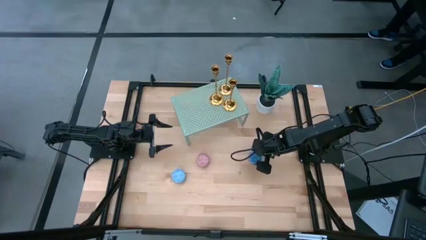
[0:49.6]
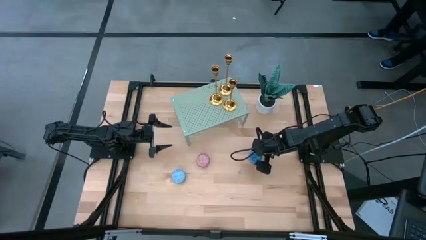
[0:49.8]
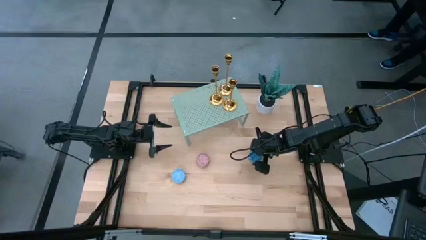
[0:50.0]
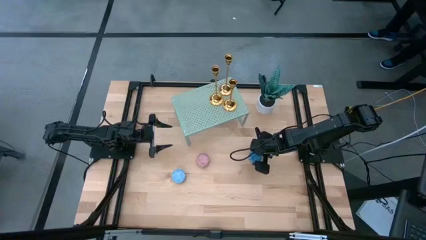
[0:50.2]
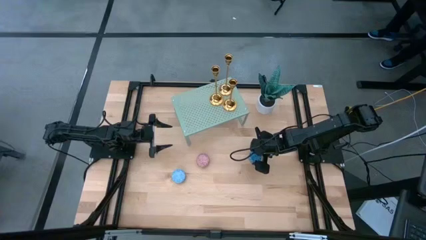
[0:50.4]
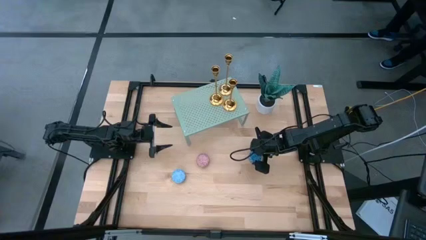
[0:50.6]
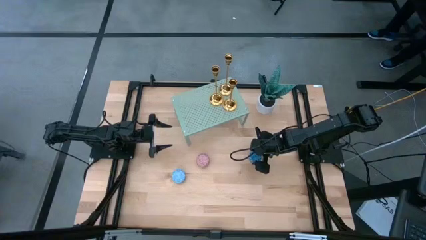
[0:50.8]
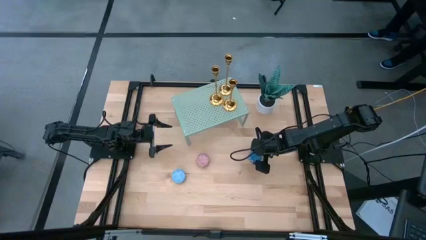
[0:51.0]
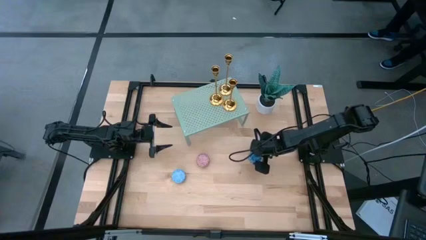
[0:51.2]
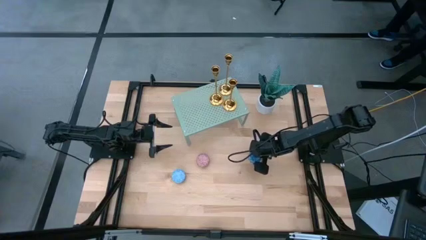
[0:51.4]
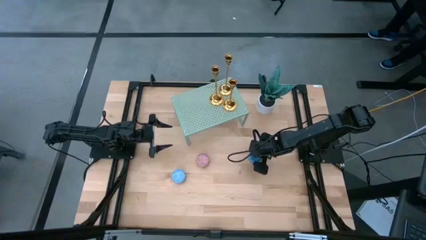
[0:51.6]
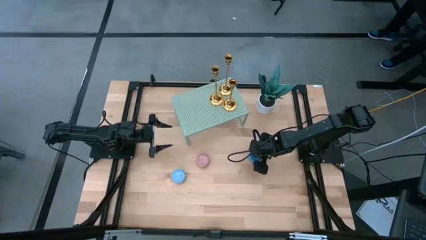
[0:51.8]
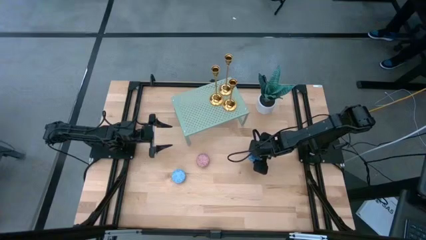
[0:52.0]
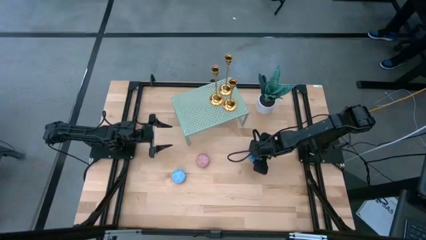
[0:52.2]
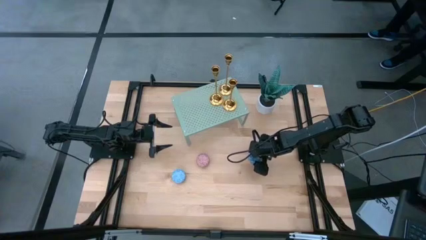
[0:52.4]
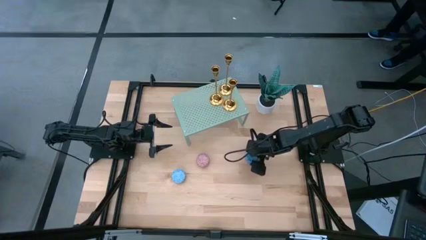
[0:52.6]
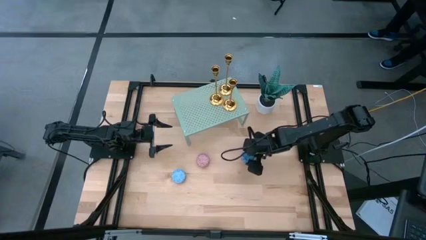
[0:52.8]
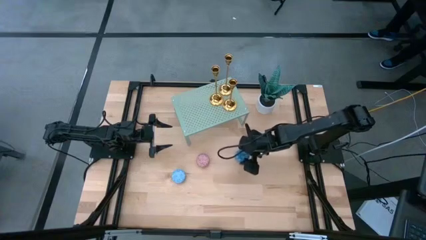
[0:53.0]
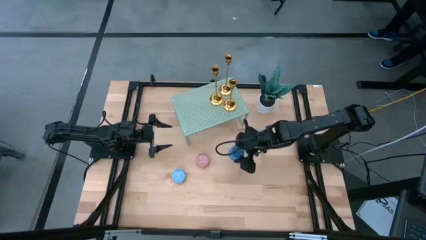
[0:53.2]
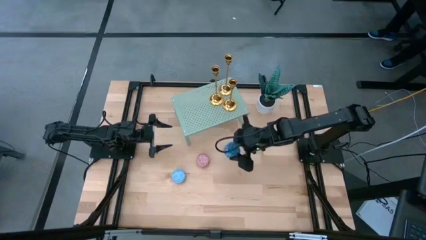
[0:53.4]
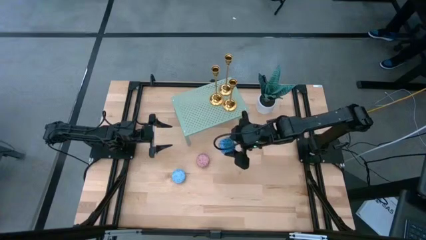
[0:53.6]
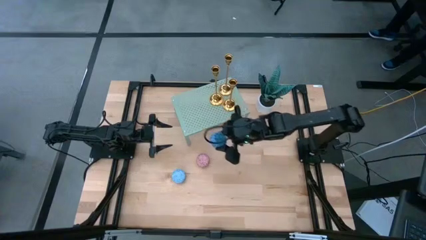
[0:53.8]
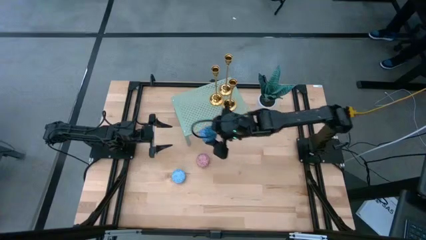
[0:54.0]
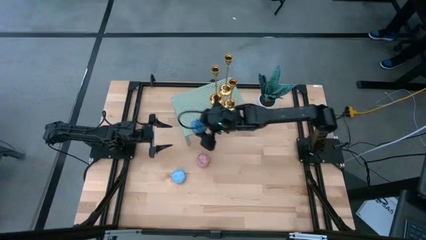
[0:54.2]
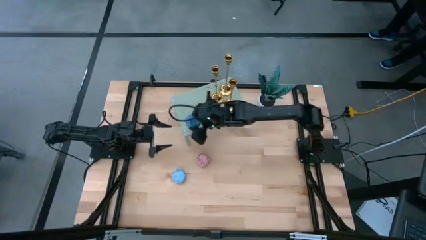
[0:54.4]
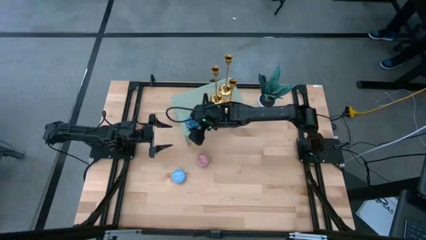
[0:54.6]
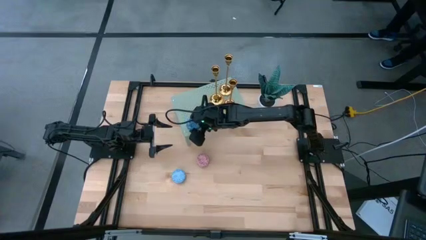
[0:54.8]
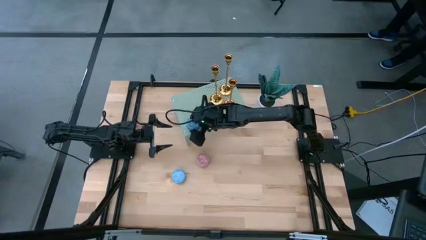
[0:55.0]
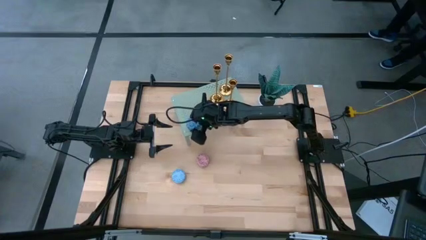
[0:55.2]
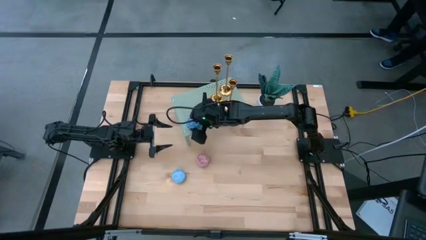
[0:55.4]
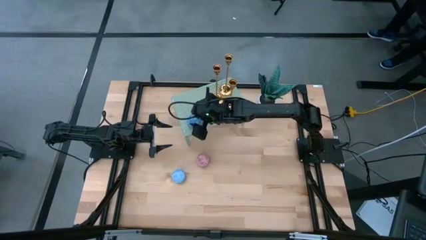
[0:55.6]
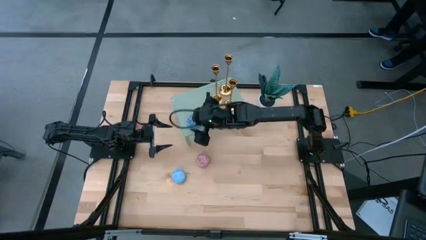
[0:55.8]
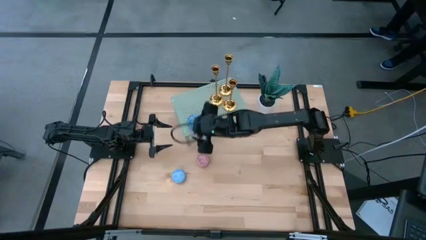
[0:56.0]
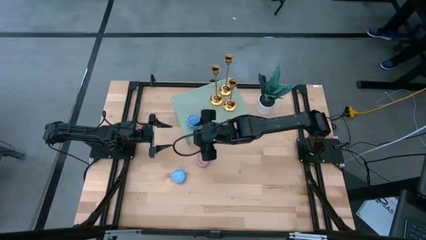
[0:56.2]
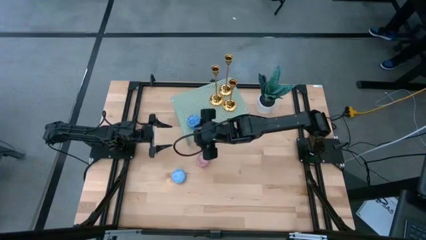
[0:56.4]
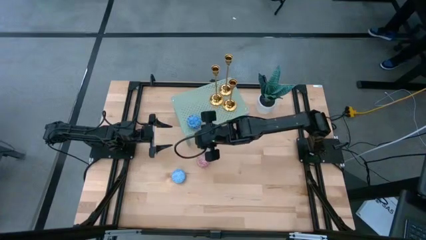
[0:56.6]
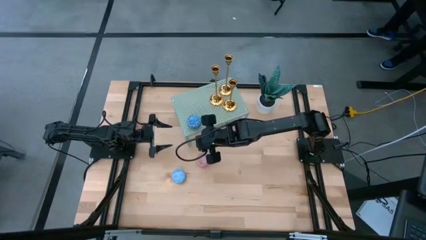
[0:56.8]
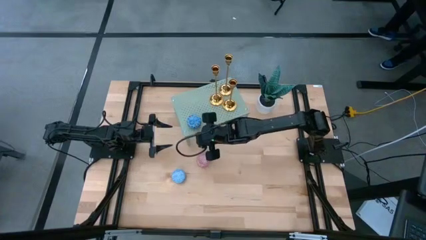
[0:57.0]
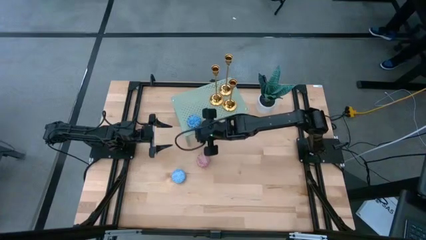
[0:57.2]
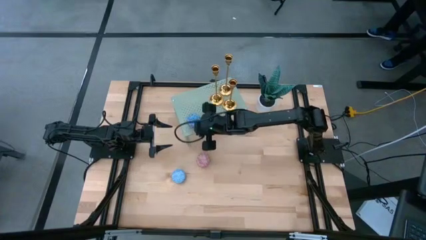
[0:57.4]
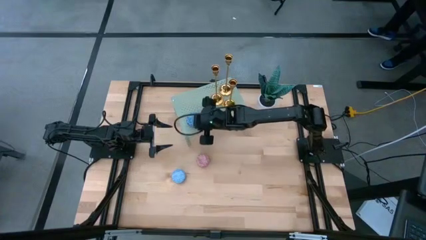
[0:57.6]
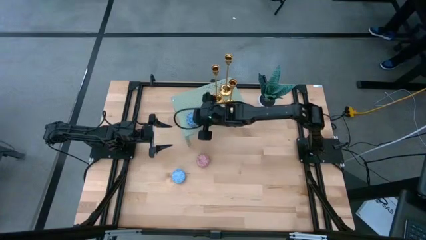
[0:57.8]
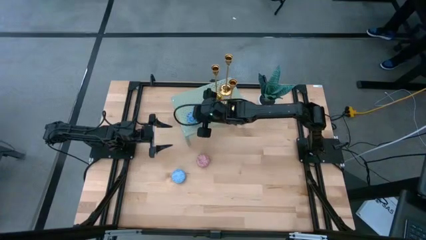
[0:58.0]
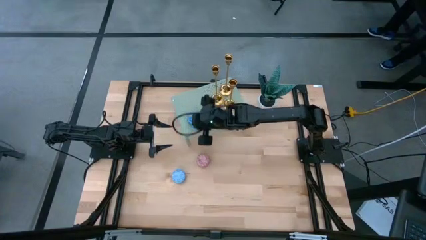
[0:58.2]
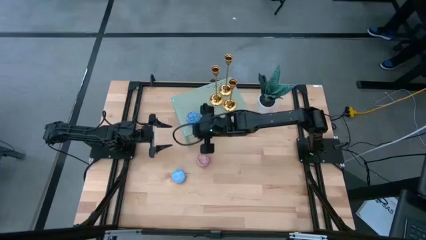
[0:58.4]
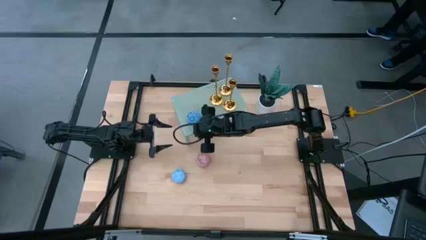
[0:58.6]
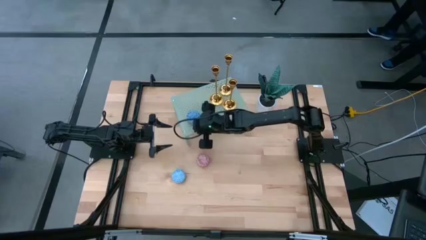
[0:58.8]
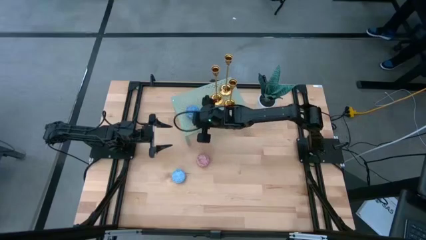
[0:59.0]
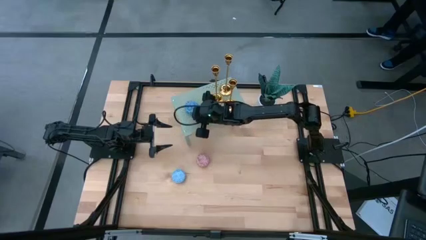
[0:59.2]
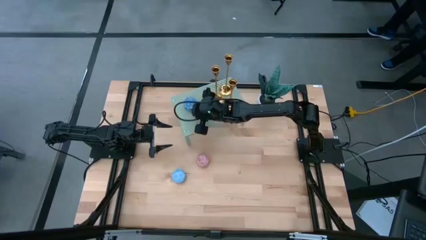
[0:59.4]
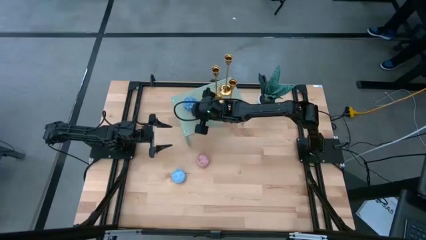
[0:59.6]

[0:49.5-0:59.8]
Task: Pick & Place candle stick holders
Put the blue scented candle on the shelf

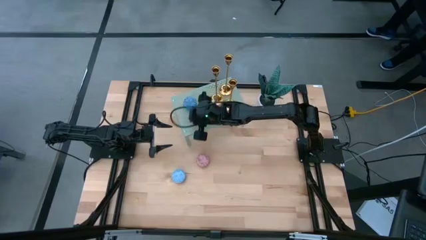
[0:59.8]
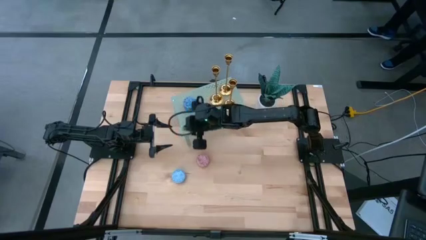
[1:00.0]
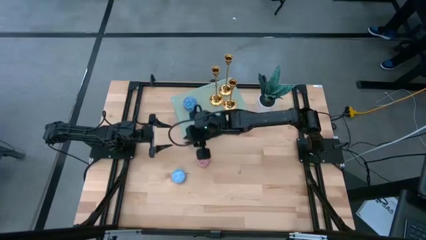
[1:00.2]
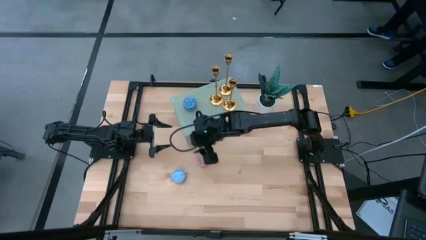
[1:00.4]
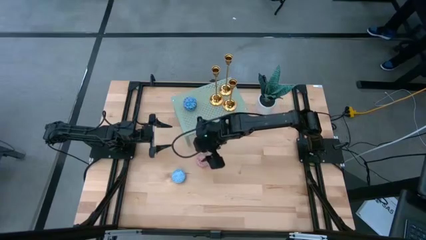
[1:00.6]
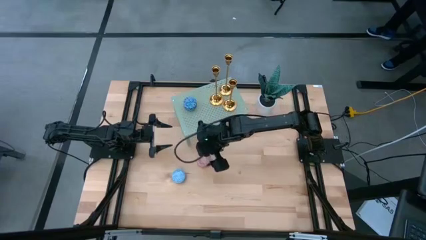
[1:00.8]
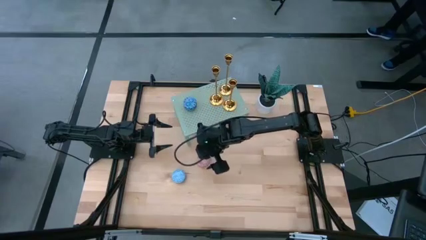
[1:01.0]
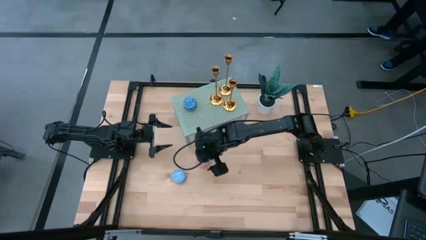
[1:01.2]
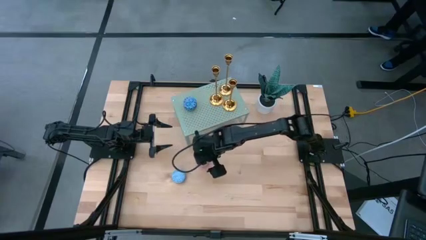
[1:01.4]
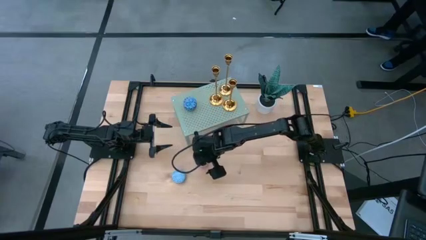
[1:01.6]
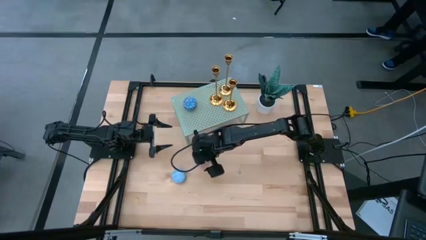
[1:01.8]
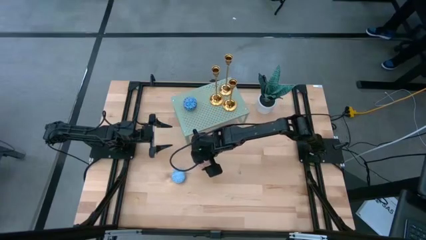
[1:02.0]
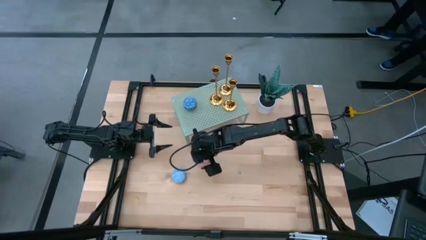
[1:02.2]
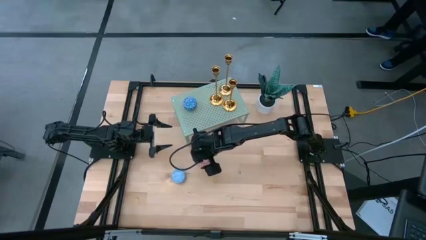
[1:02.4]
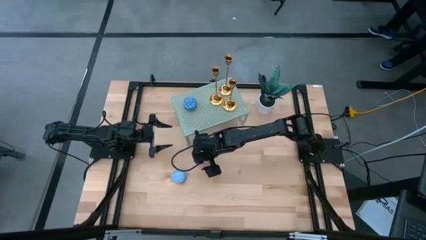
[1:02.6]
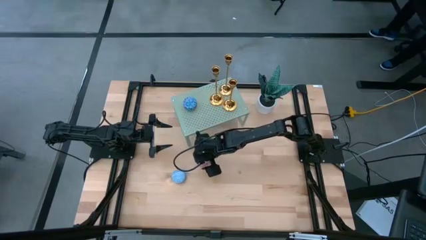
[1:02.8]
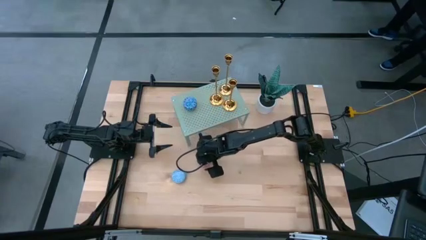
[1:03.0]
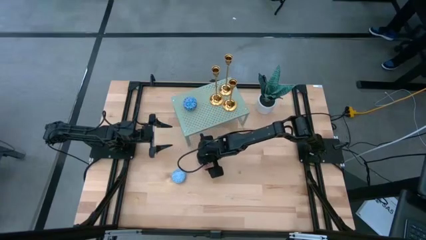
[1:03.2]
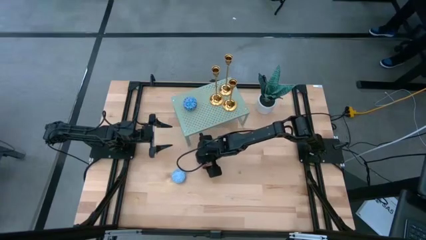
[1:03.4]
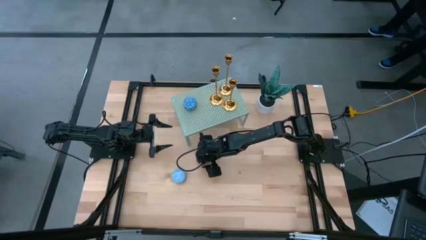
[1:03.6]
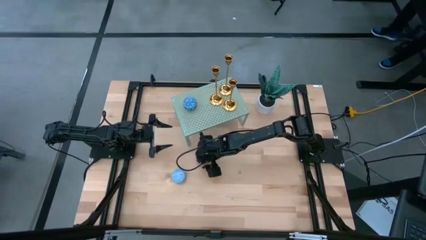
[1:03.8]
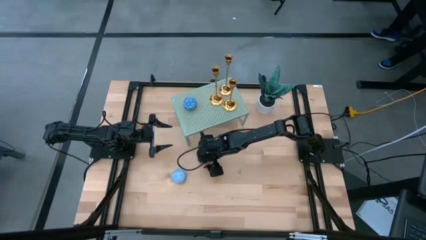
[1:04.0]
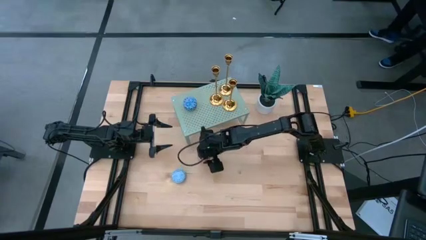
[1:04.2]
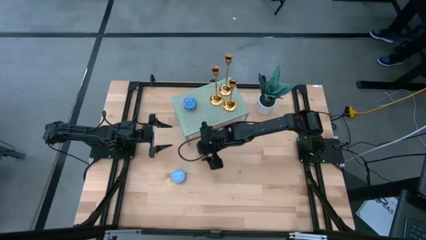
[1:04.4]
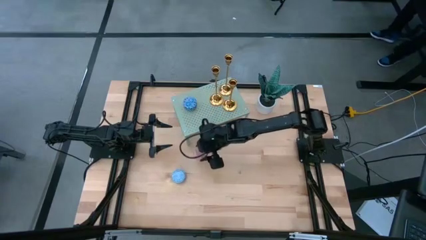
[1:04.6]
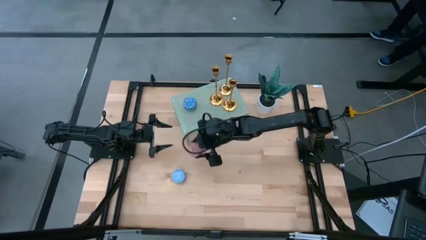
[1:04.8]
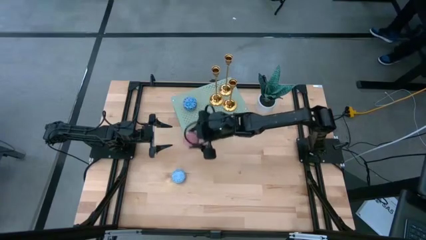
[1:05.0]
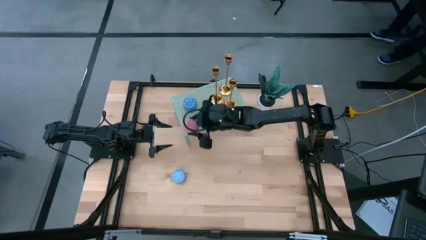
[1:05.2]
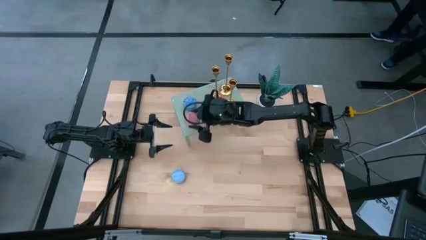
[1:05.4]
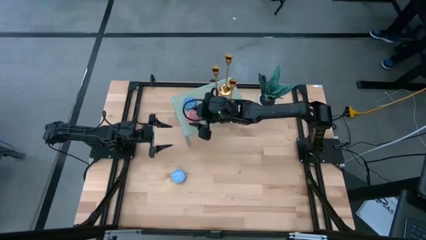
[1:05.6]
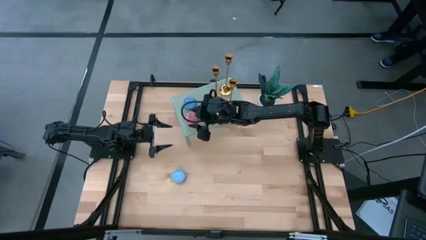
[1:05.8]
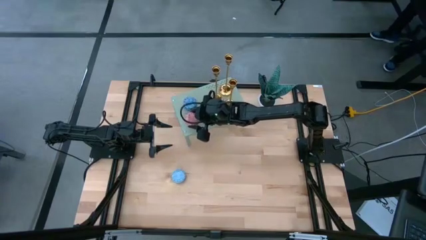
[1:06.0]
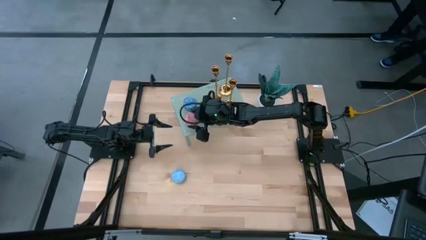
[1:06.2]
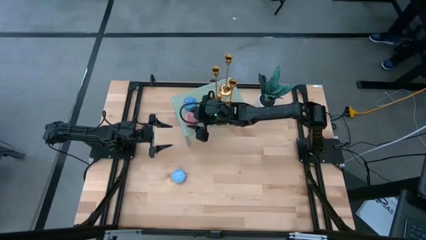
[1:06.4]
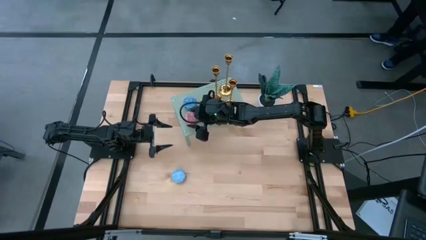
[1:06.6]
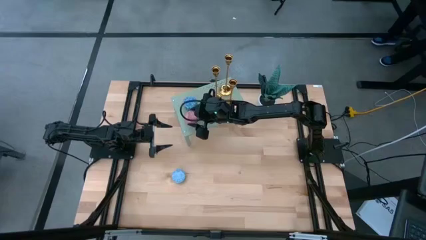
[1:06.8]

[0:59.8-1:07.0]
Put the red scented candle on the shelf
